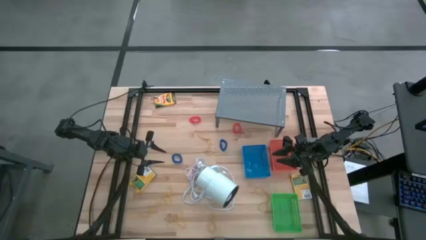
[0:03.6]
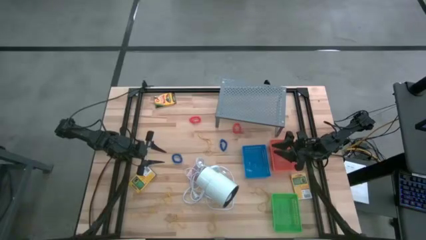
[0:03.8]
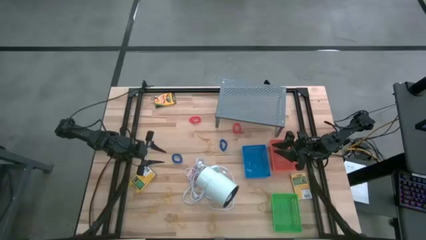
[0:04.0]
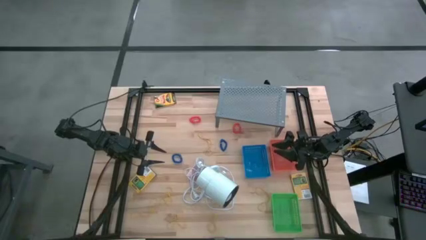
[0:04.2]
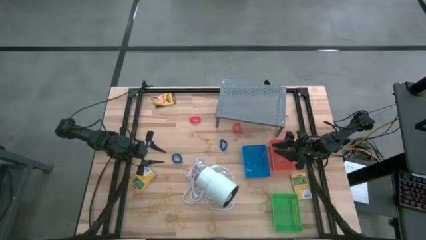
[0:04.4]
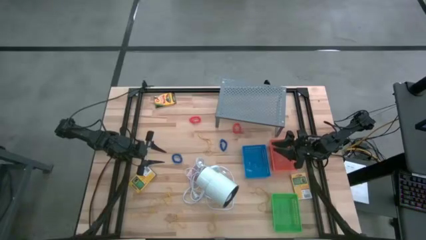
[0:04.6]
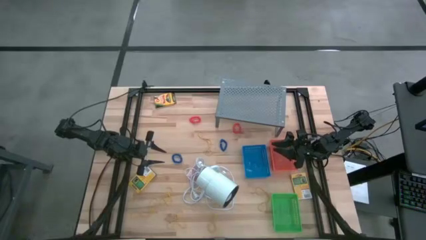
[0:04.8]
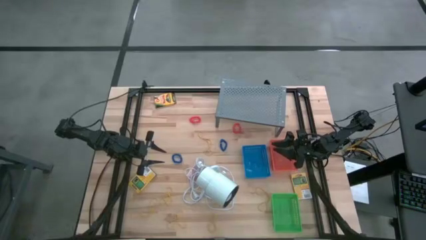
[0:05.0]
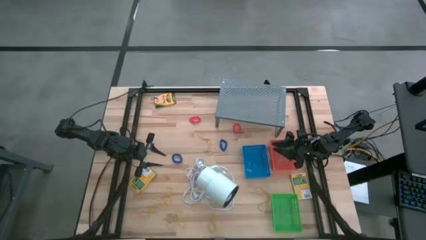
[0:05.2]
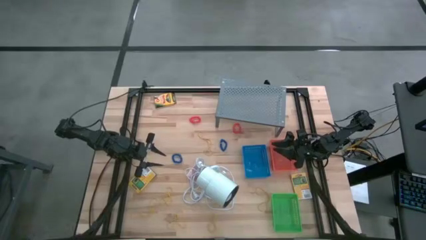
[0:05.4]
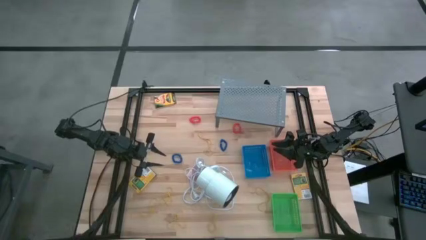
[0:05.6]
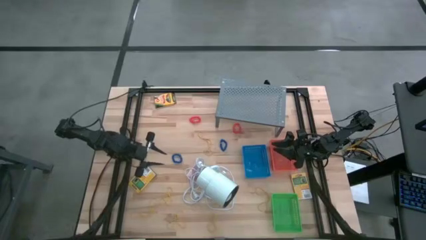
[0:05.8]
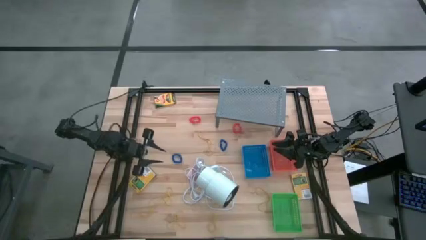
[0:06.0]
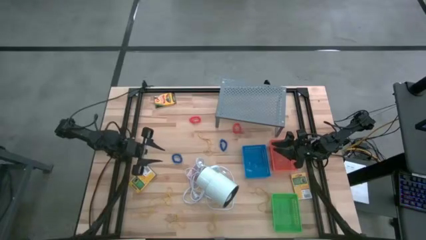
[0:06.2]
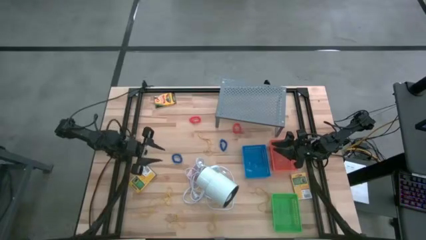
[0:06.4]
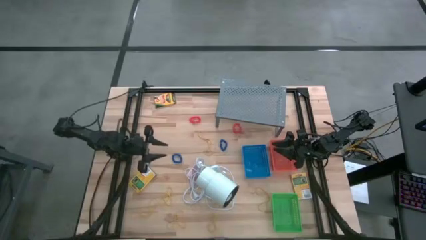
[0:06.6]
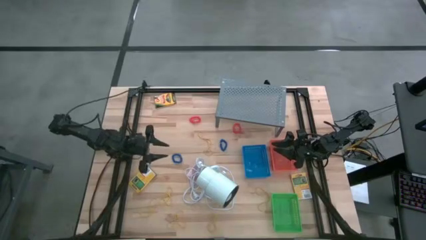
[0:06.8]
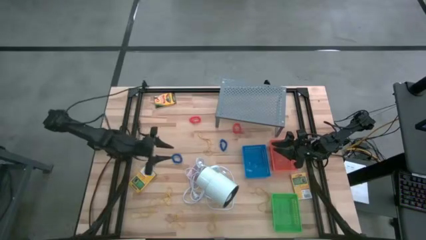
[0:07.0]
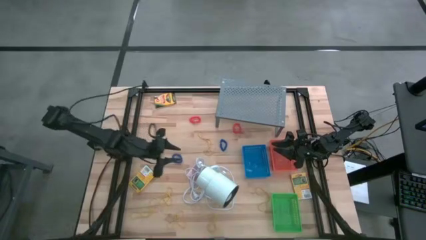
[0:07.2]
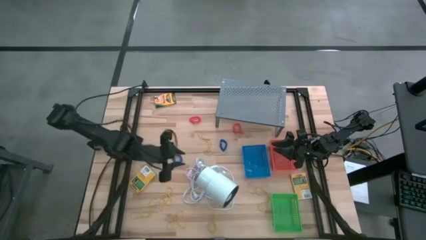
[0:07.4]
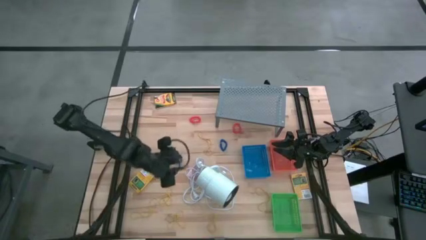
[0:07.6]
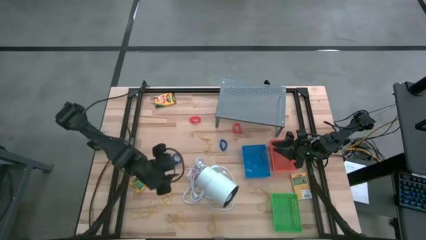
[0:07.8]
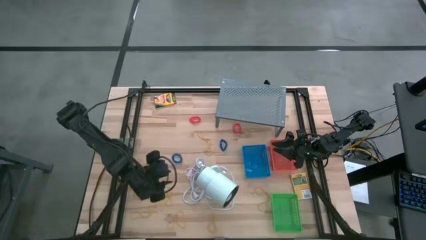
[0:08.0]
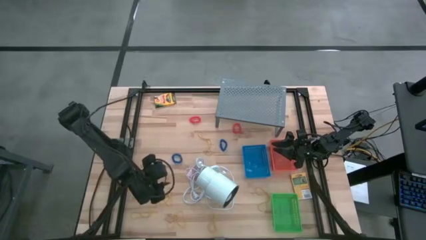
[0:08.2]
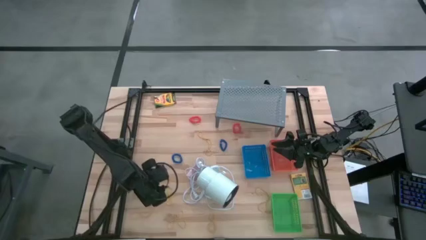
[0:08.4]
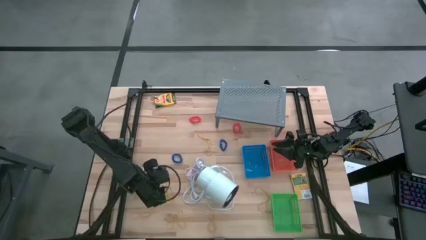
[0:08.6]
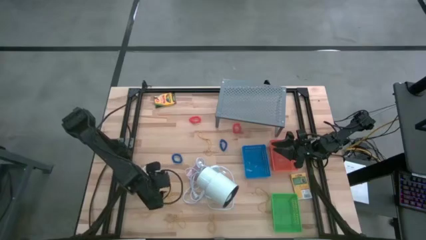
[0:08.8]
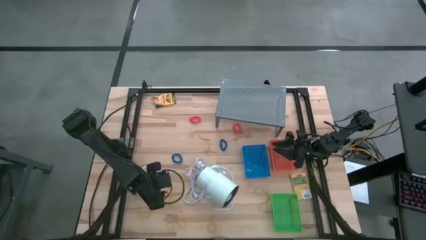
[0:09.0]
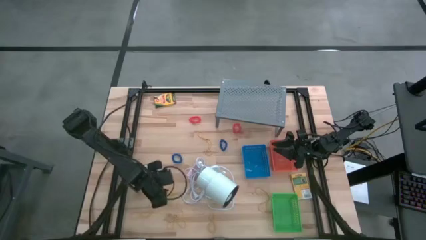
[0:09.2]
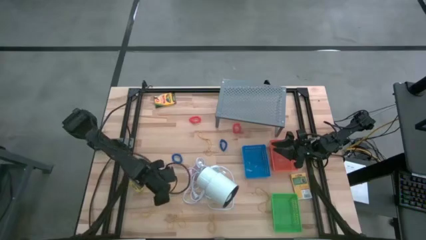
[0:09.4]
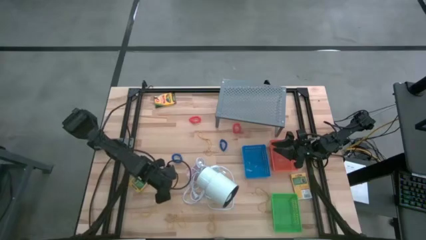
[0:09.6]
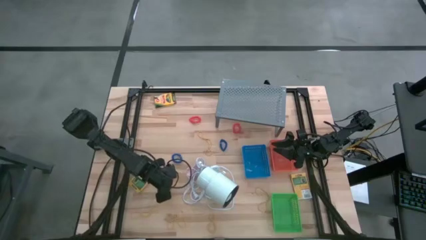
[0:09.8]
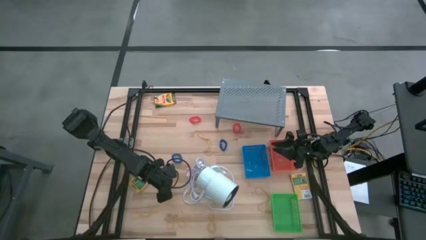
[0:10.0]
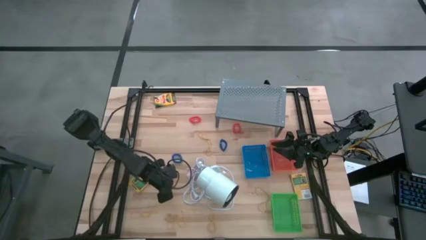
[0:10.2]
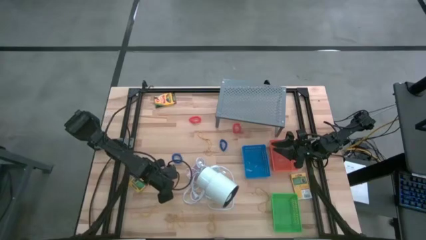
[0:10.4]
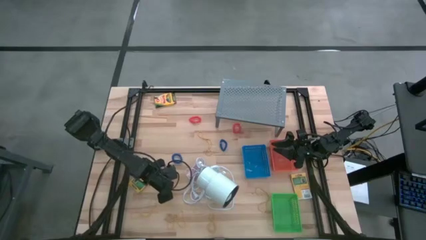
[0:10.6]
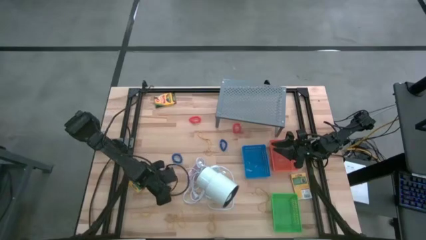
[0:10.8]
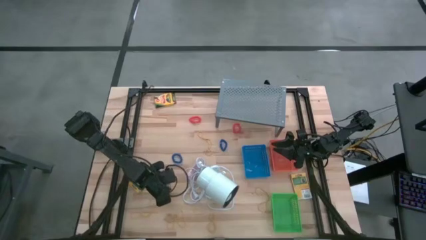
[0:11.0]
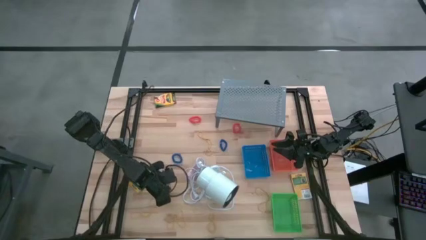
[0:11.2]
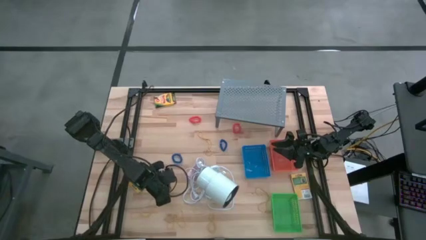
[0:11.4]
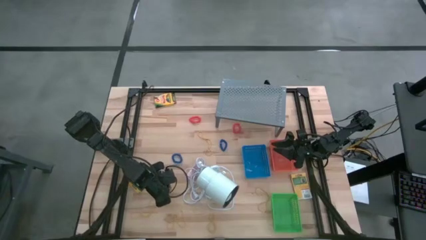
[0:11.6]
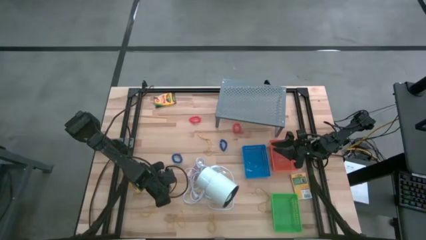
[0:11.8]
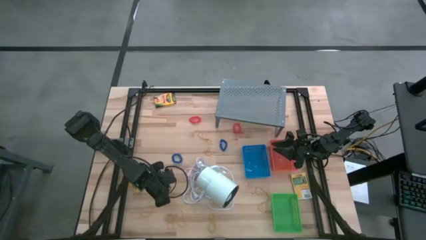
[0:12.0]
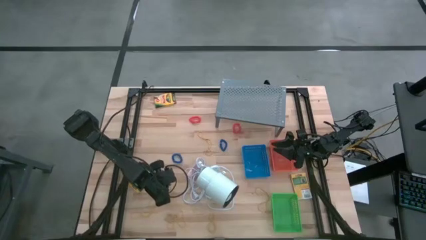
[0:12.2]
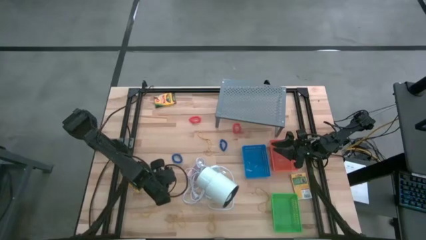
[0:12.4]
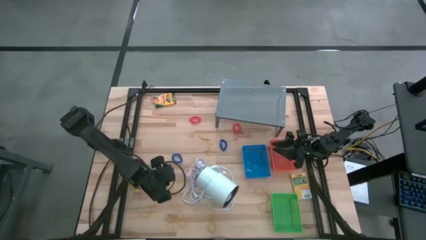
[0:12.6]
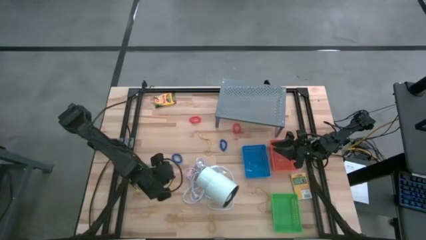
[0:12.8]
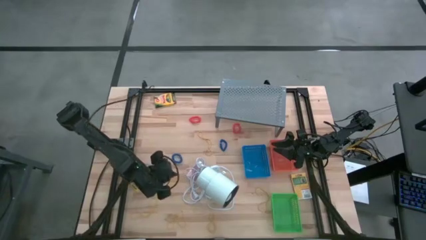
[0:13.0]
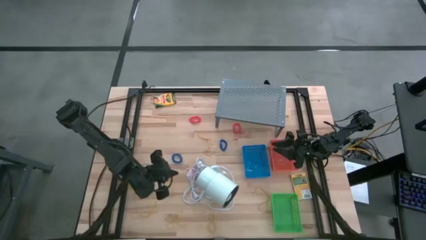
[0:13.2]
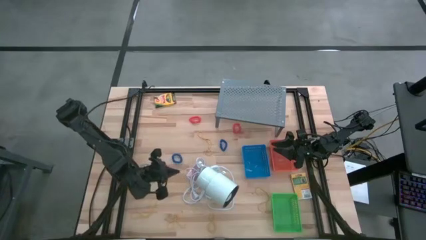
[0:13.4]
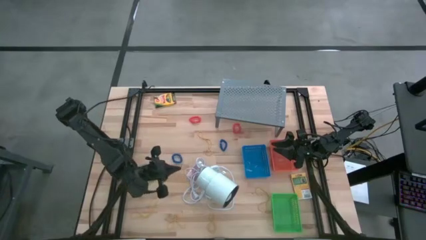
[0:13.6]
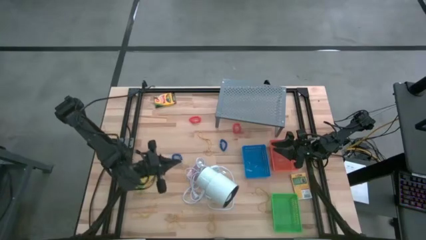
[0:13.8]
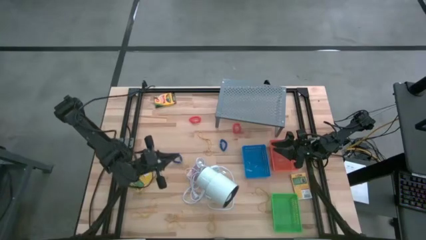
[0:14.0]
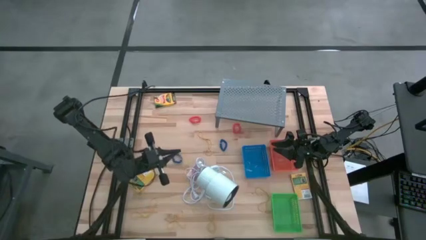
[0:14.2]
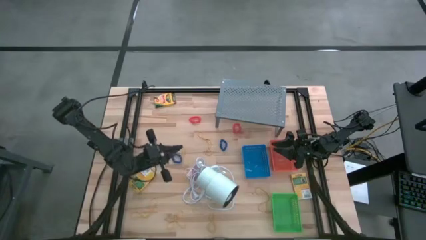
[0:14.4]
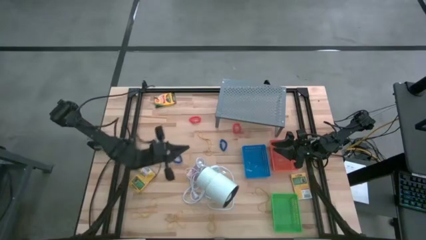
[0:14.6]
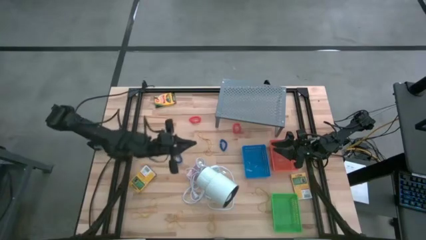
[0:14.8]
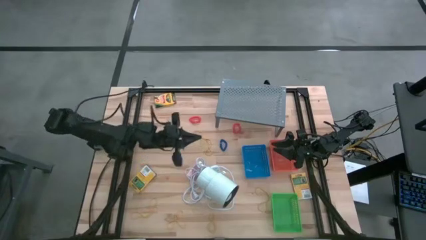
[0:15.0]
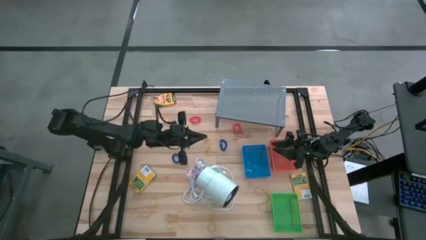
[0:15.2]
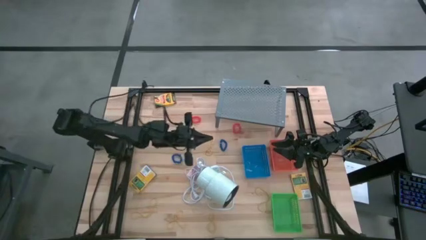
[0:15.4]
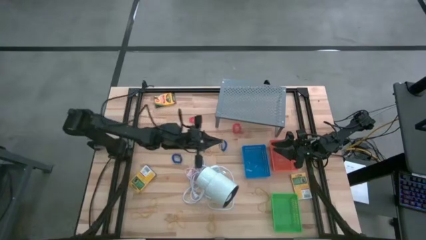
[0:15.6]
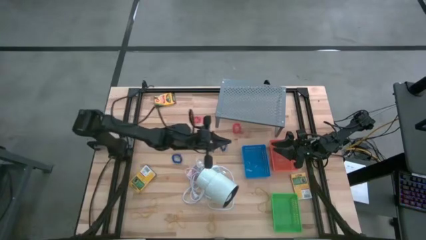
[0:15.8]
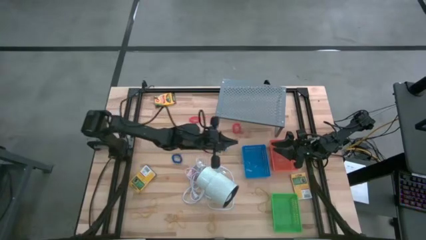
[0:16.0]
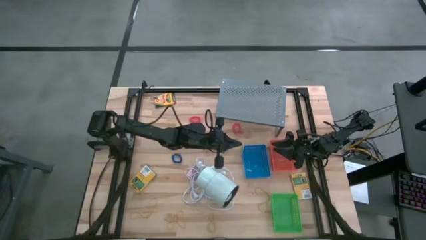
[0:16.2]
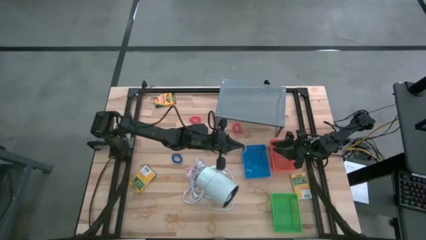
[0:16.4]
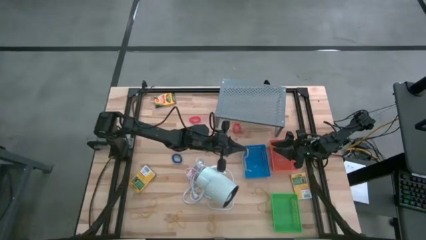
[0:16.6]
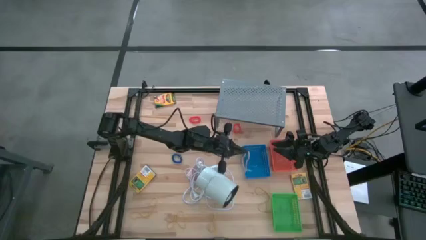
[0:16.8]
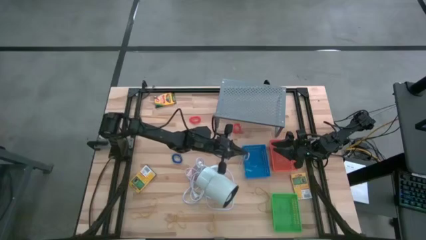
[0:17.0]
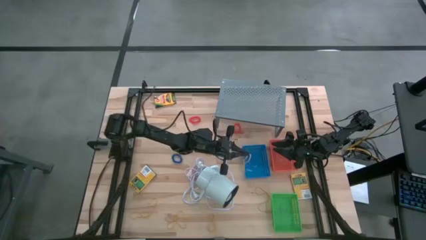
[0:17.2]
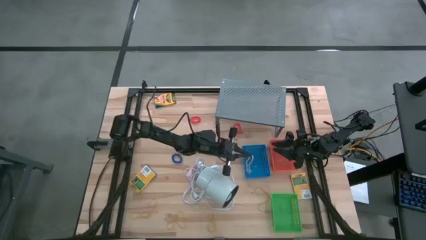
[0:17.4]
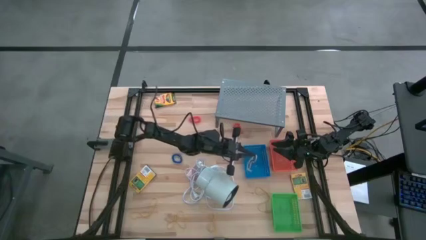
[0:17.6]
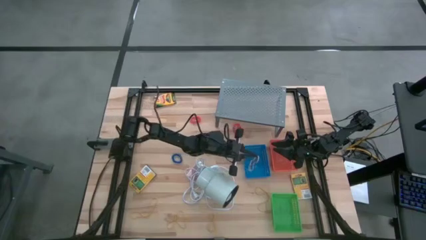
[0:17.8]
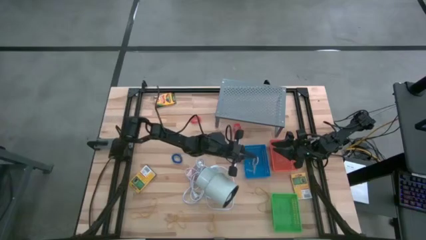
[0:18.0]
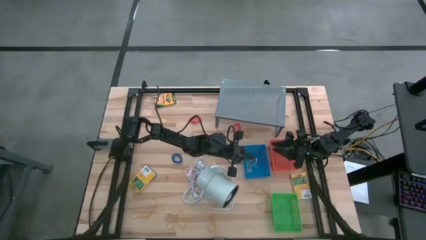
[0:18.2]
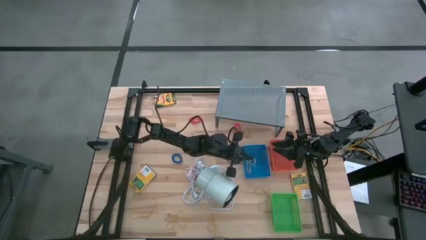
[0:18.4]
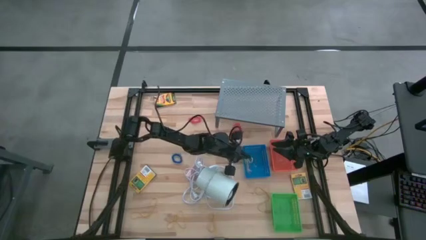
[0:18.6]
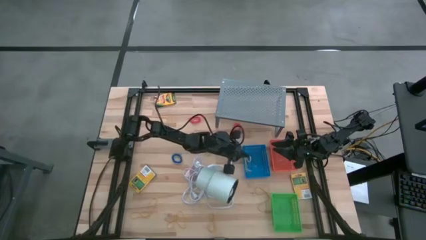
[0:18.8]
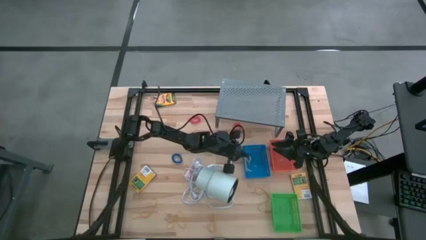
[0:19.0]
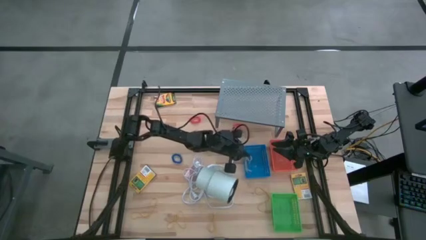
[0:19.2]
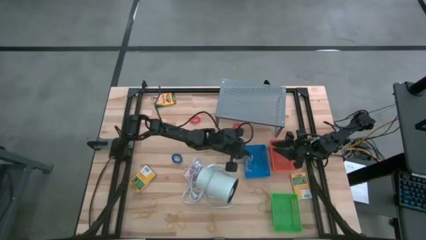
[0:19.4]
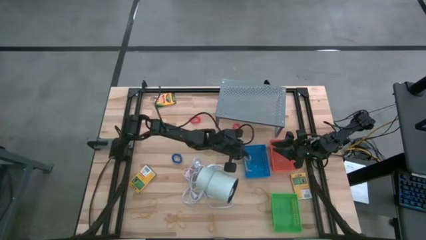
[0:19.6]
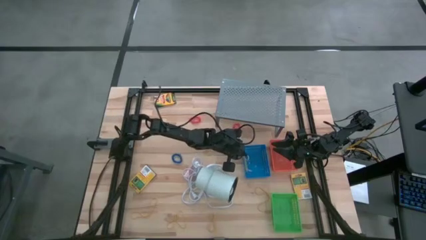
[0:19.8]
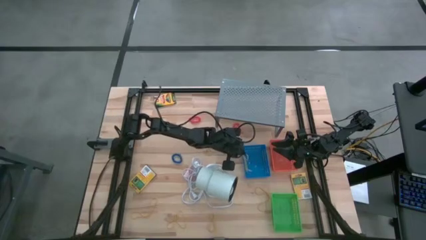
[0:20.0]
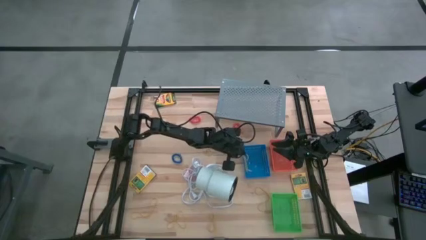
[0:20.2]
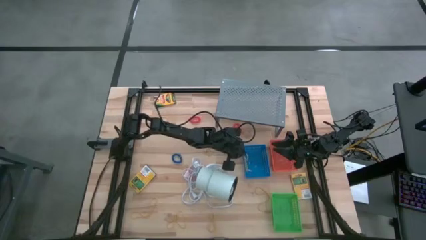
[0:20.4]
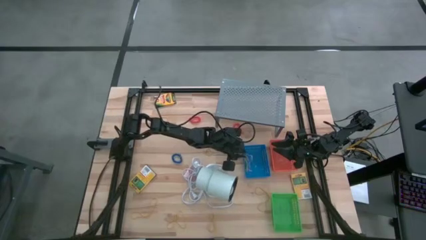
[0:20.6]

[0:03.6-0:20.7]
Task: Pick & Place Office Desk Supplies
Put the yellow rubber band into the blue bin
